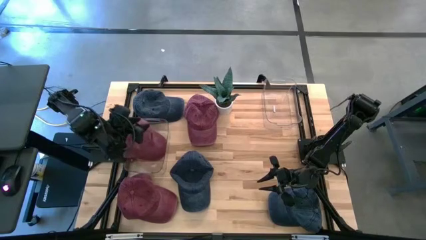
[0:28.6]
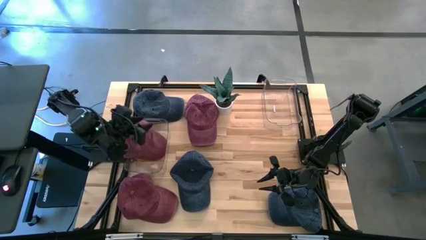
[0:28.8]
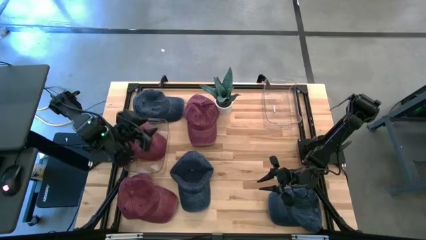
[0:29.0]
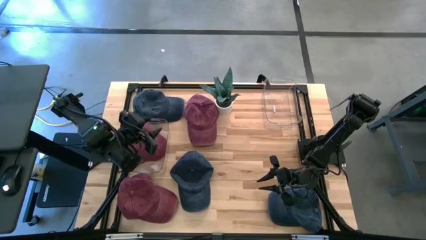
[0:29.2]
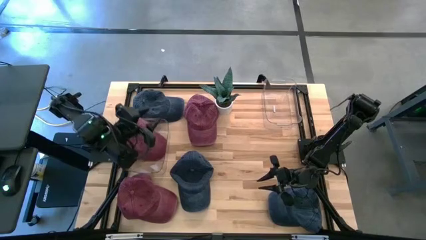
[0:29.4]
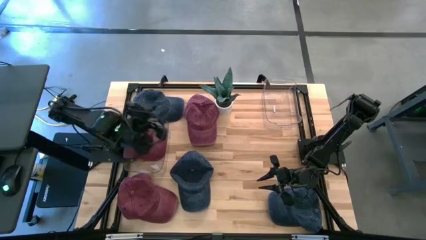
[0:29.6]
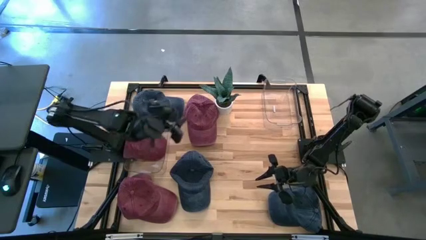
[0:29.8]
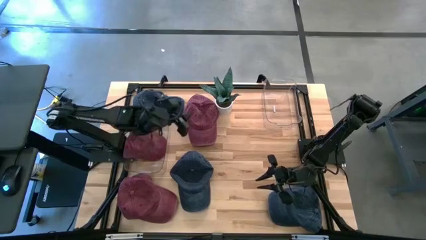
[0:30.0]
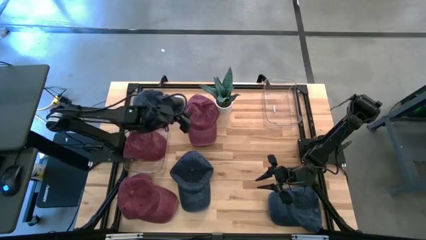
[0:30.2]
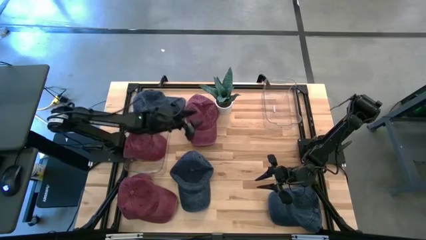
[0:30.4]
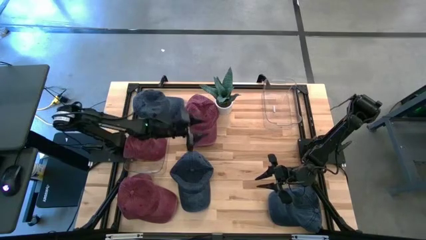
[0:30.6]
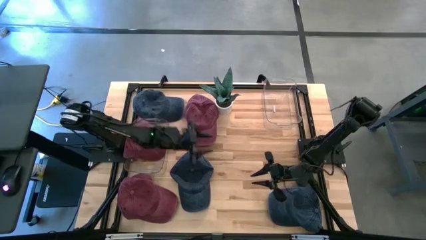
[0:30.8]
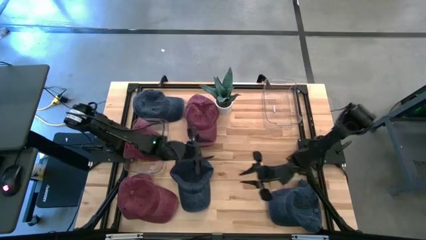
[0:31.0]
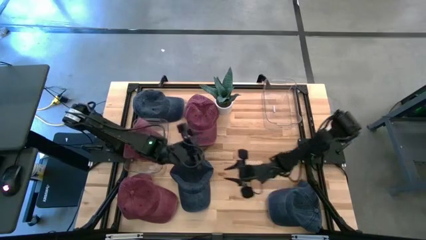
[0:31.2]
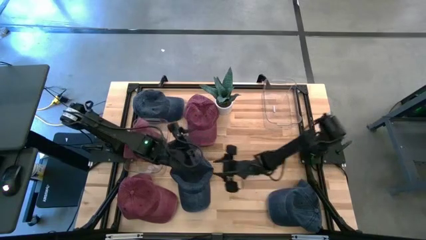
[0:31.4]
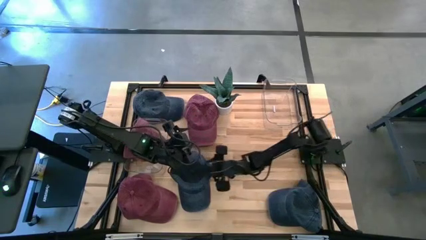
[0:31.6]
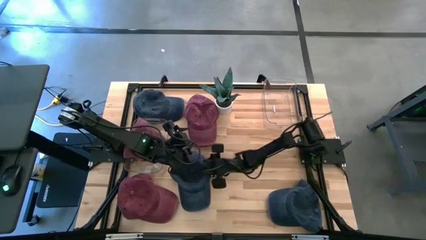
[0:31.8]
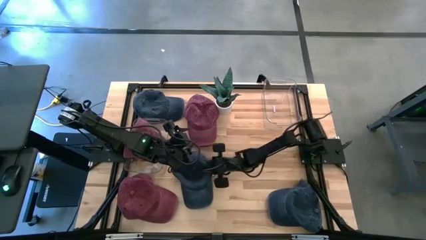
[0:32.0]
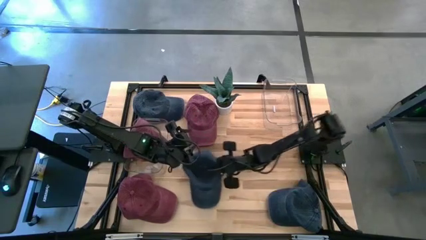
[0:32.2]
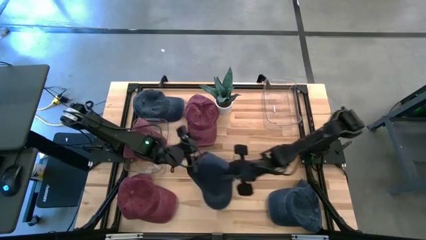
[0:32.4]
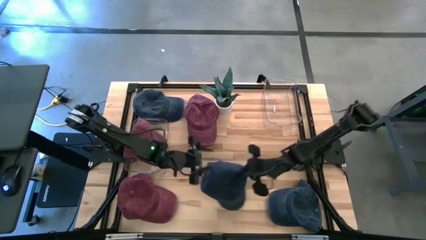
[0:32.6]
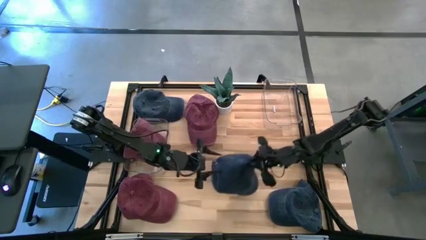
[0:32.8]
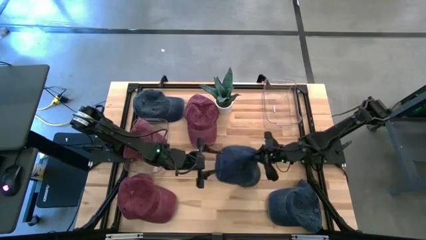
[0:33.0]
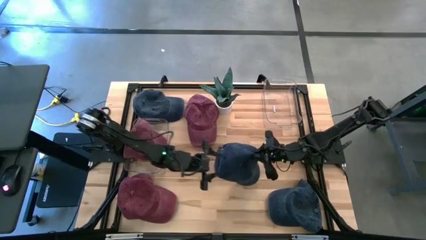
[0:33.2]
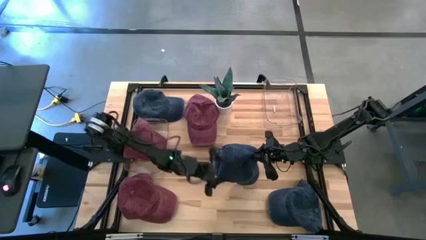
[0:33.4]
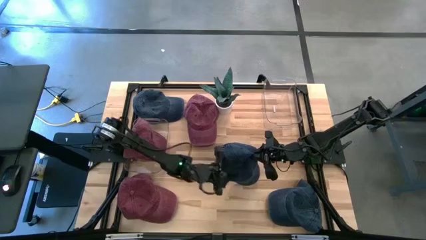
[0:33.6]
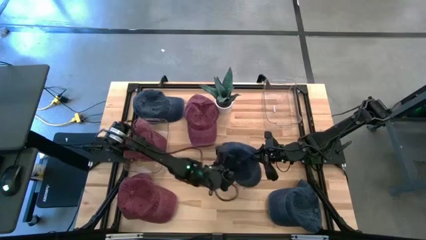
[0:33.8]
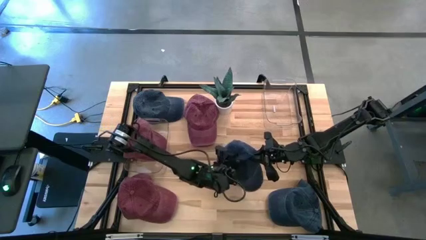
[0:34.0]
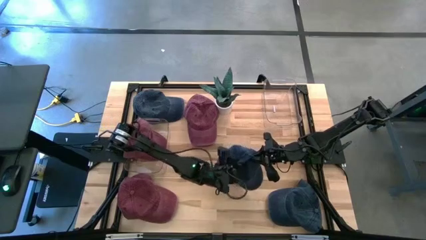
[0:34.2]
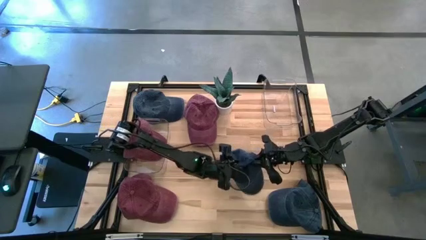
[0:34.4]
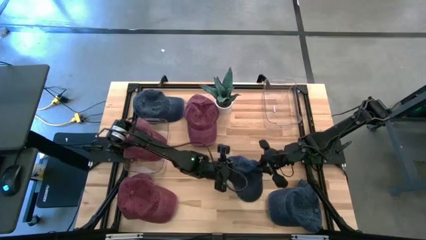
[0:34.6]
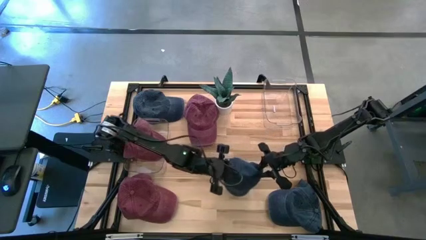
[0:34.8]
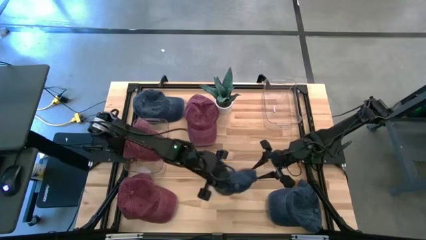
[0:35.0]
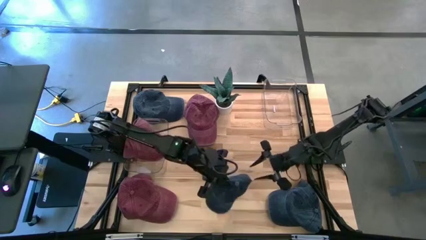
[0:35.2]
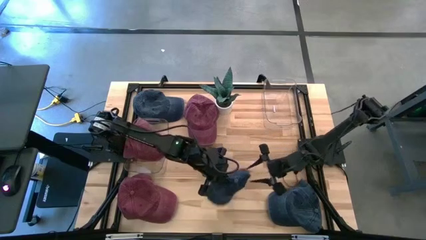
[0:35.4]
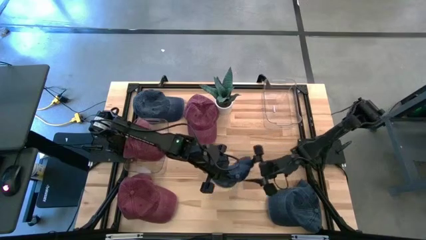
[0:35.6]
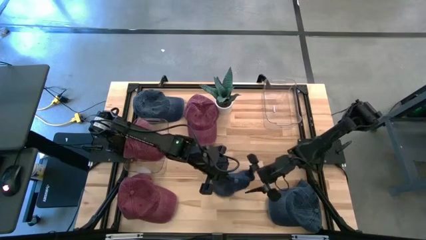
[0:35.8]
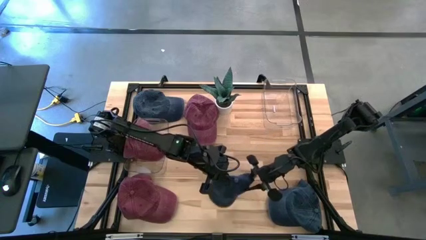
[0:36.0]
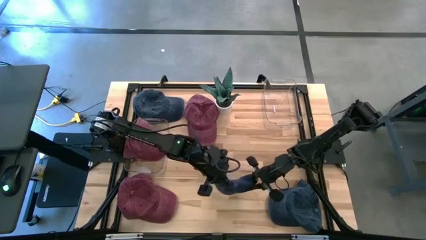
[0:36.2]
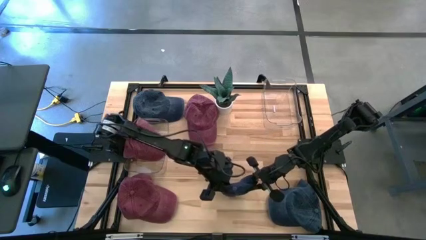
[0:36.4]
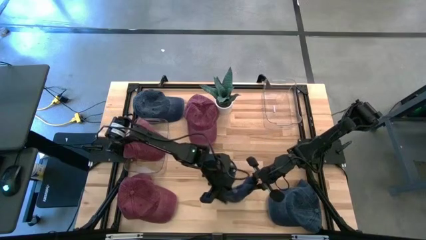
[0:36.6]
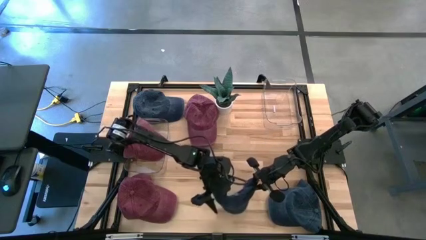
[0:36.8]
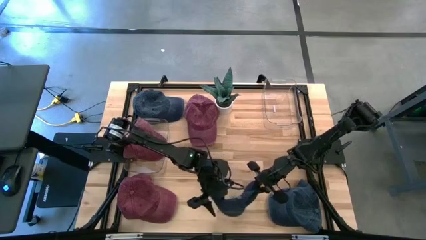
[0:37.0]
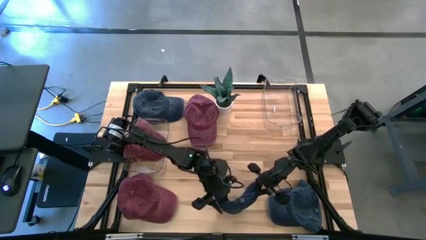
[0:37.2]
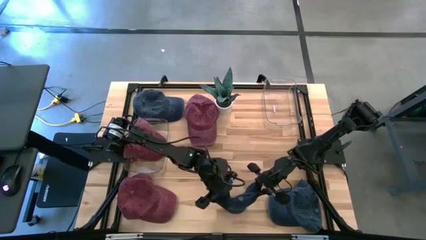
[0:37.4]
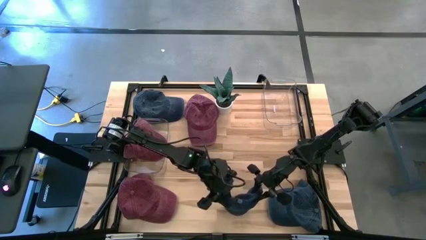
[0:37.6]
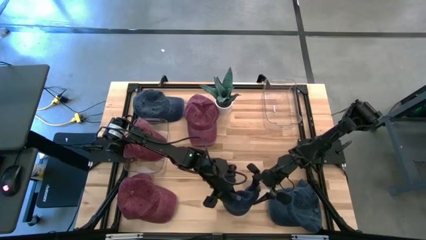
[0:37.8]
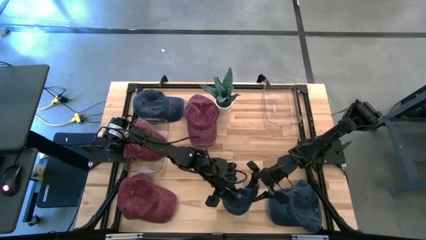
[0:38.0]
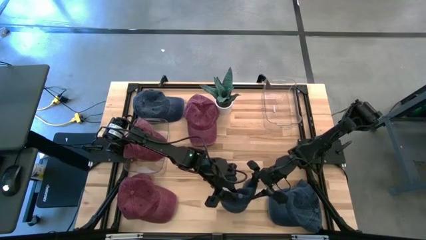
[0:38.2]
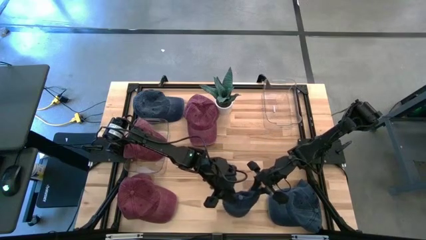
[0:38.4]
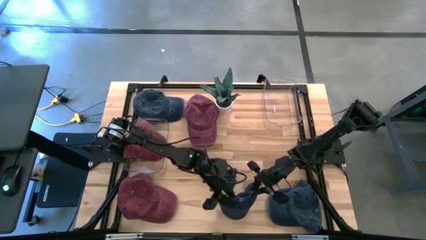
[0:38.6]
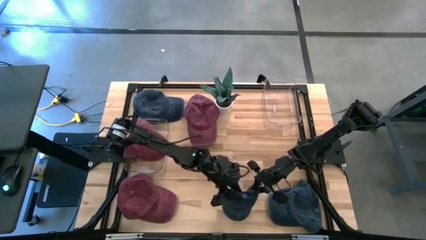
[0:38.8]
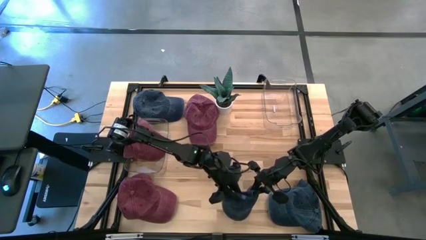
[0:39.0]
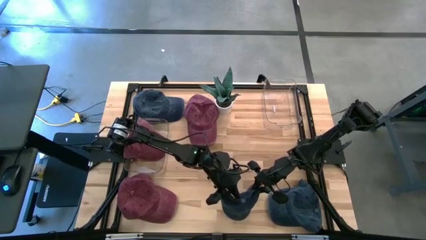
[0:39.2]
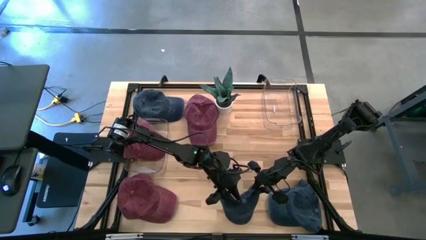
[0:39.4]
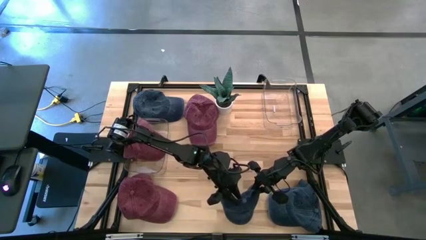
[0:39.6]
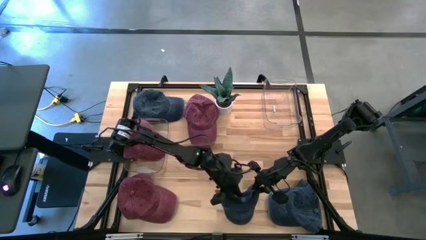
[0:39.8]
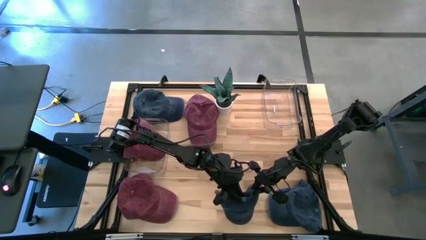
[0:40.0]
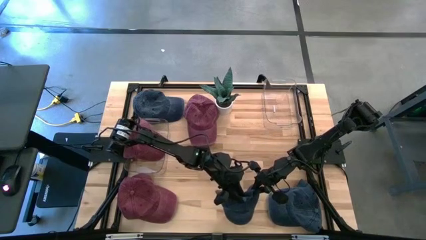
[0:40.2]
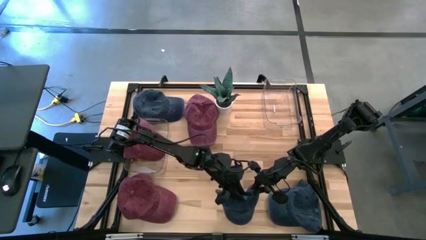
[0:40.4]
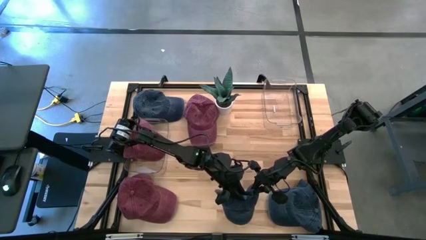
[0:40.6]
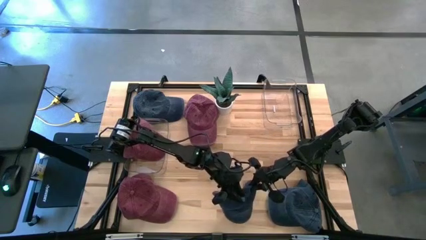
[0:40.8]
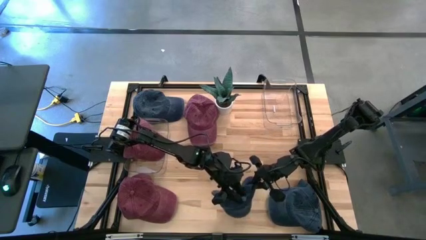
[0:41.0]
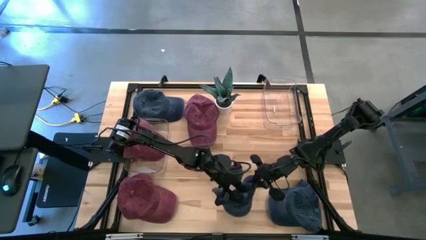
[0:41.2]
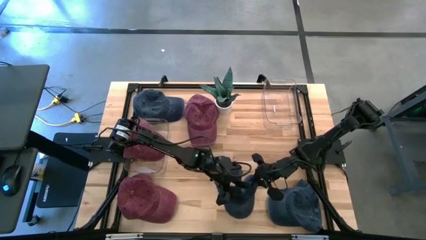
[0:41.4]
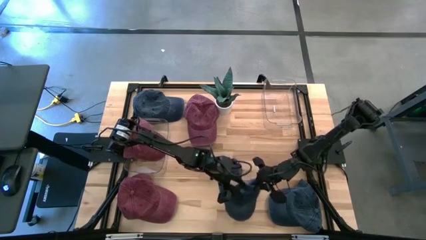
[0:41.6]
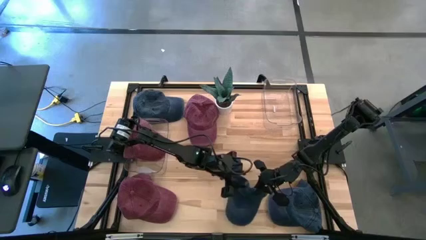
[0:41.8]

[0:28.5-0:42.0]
Task: Pick & Place hat
Put the middle blue cap into the right transparent bin
